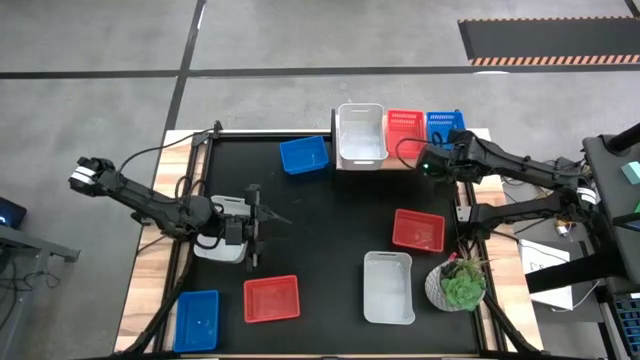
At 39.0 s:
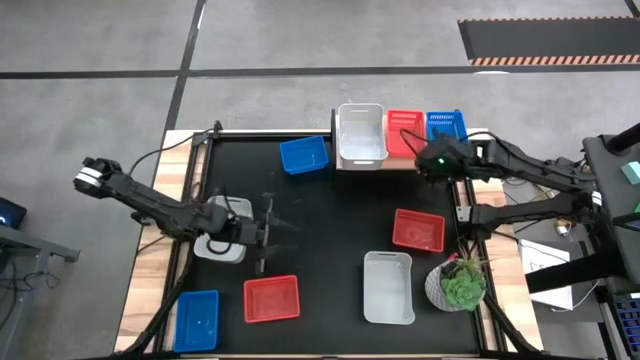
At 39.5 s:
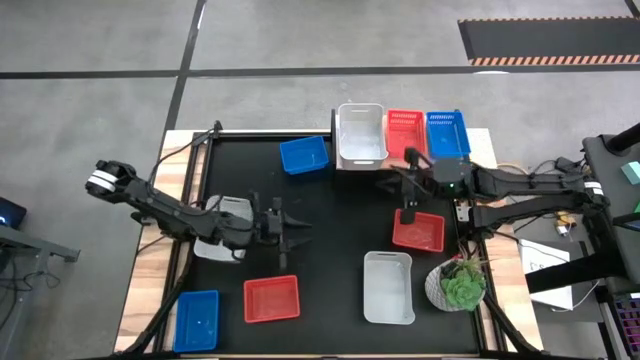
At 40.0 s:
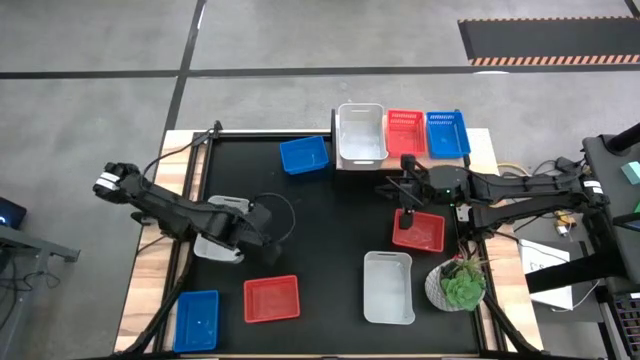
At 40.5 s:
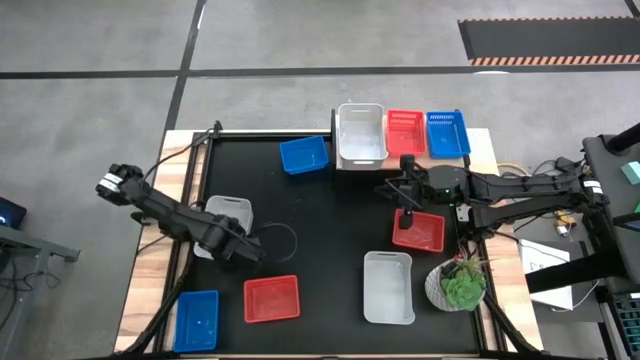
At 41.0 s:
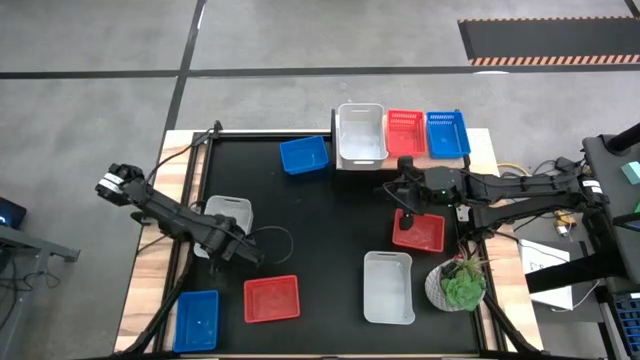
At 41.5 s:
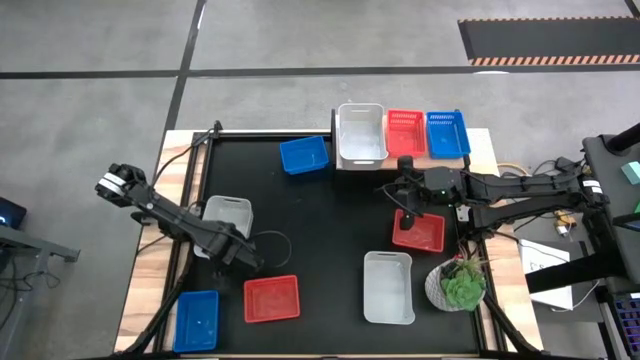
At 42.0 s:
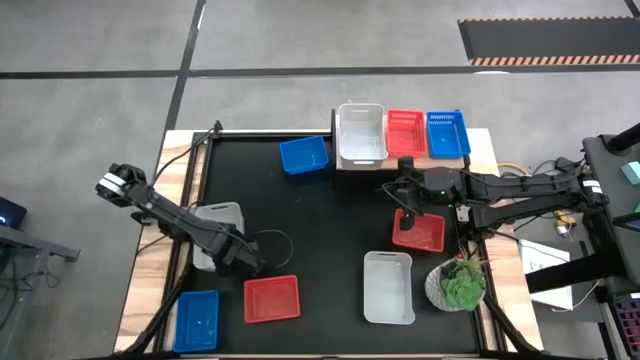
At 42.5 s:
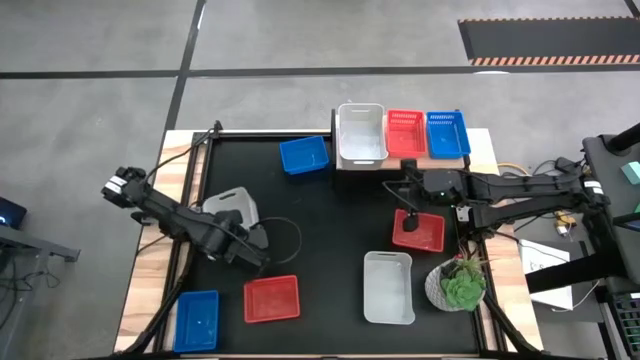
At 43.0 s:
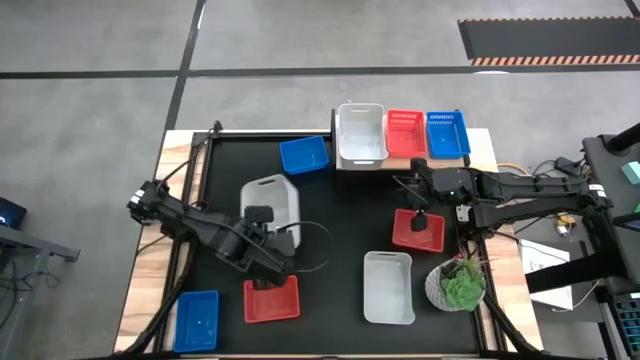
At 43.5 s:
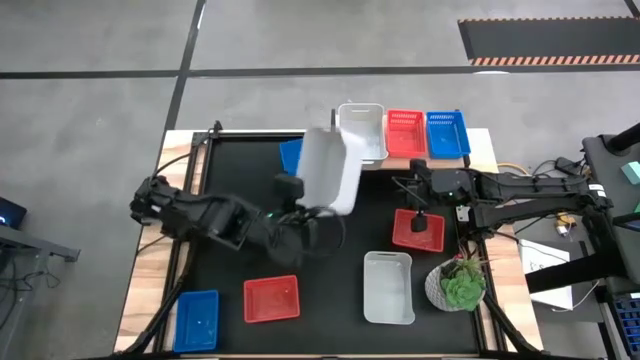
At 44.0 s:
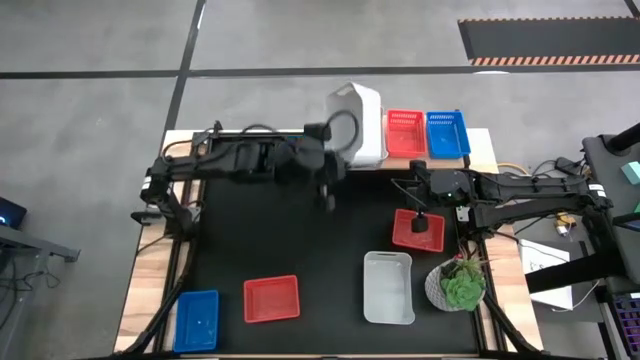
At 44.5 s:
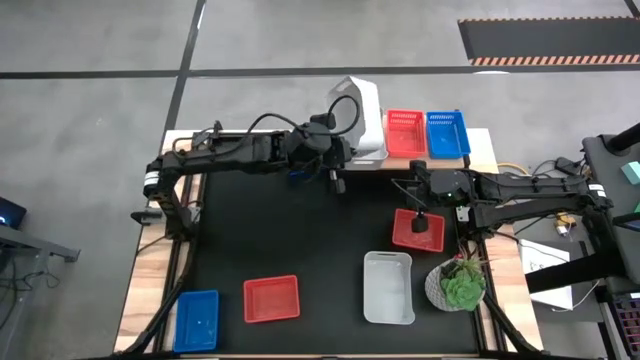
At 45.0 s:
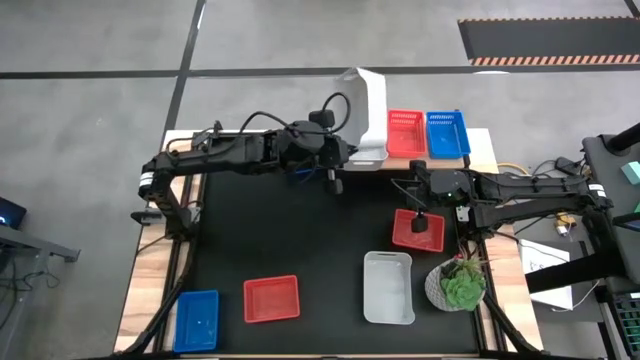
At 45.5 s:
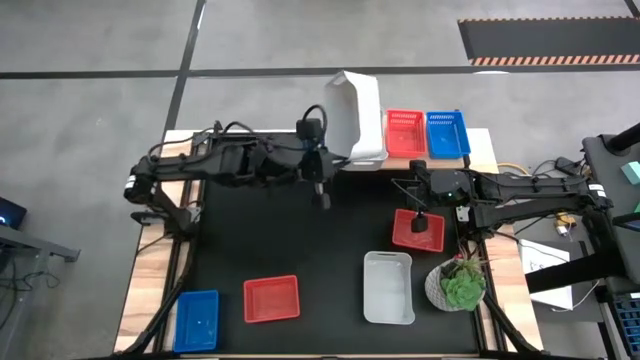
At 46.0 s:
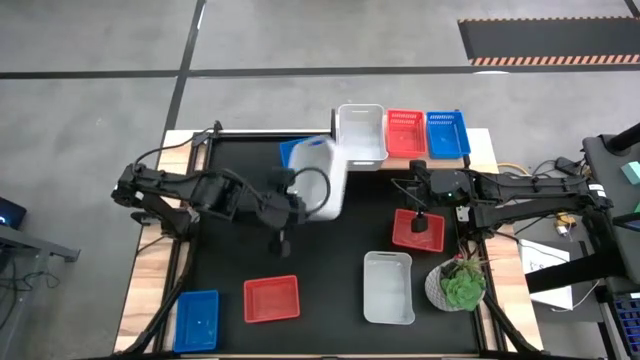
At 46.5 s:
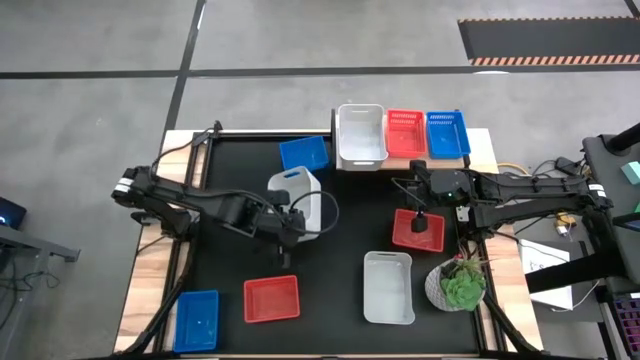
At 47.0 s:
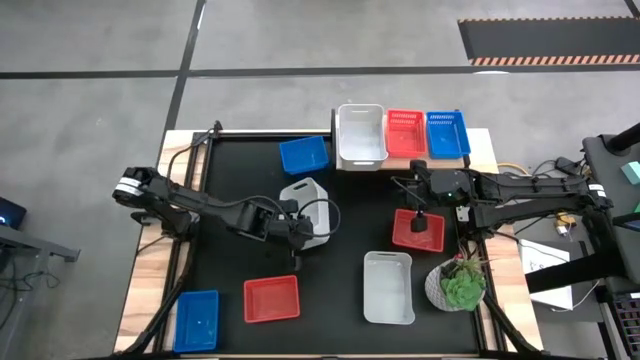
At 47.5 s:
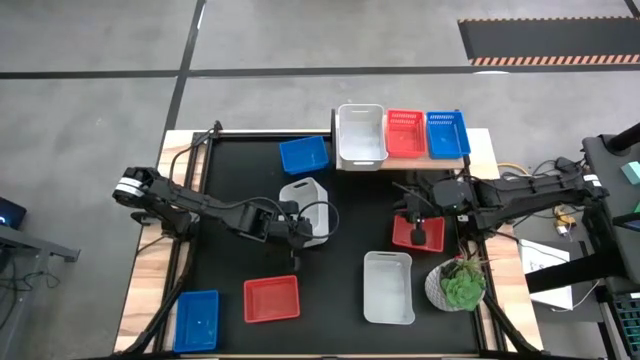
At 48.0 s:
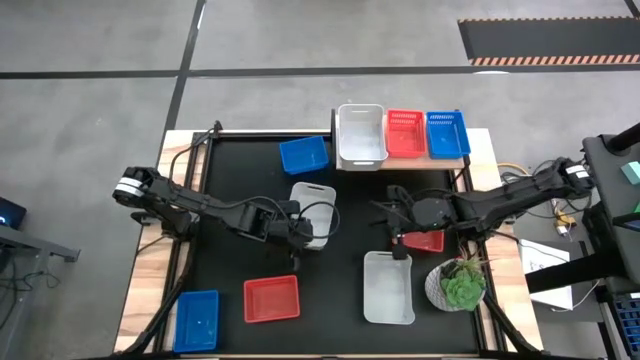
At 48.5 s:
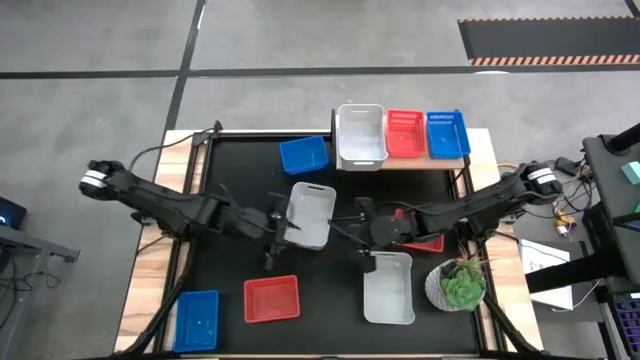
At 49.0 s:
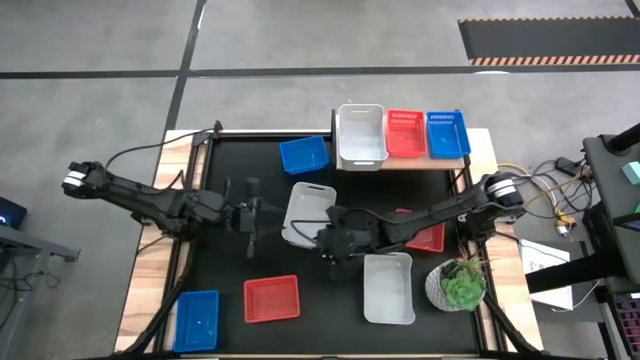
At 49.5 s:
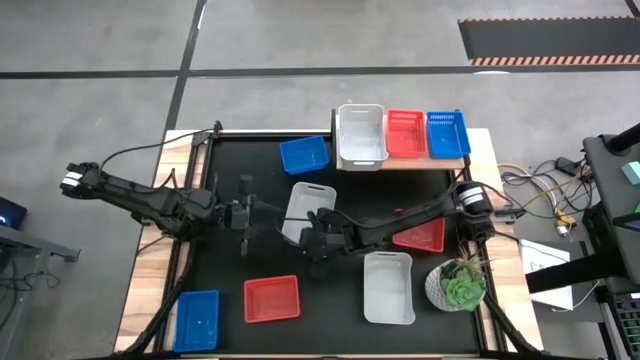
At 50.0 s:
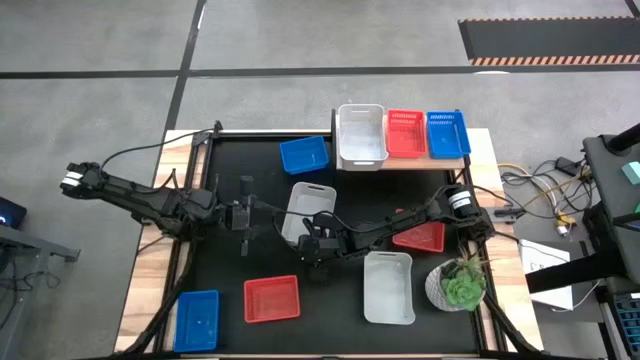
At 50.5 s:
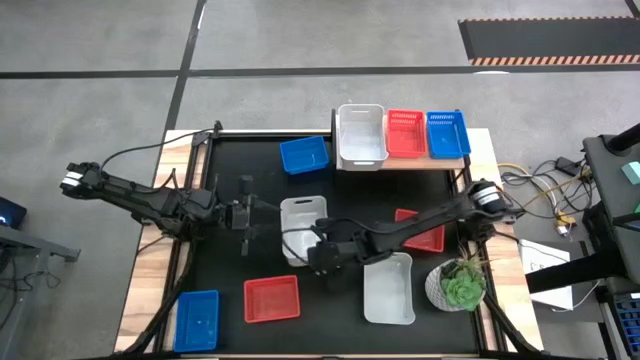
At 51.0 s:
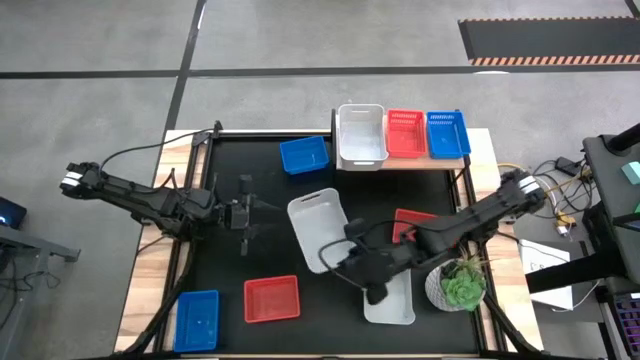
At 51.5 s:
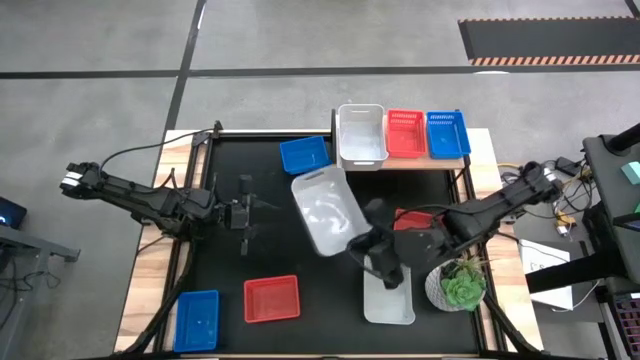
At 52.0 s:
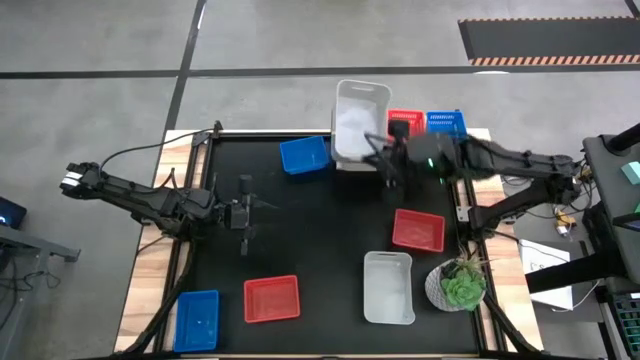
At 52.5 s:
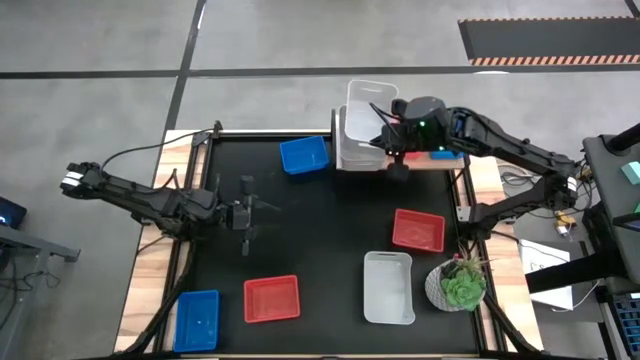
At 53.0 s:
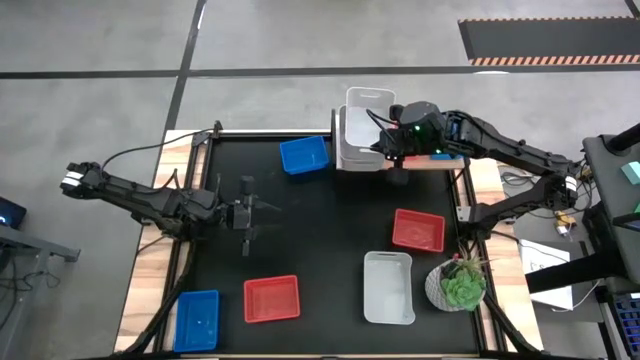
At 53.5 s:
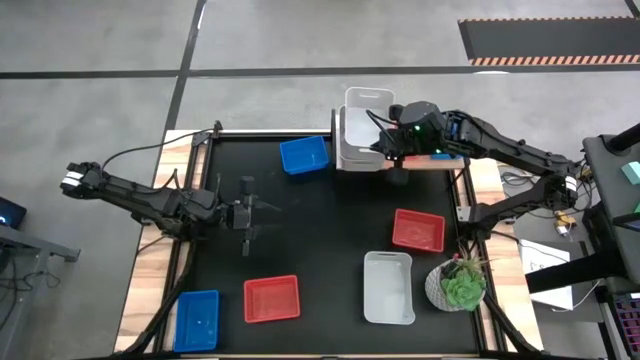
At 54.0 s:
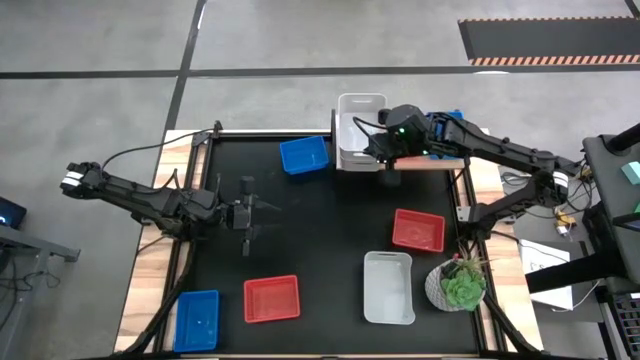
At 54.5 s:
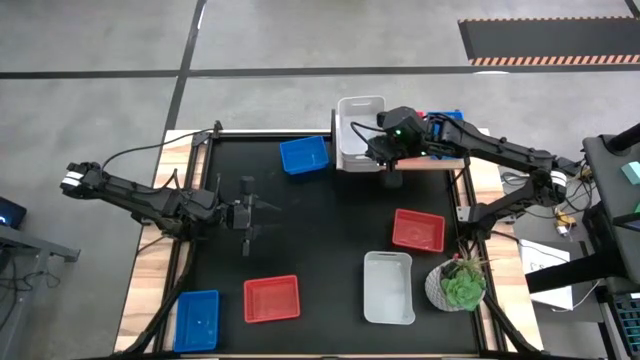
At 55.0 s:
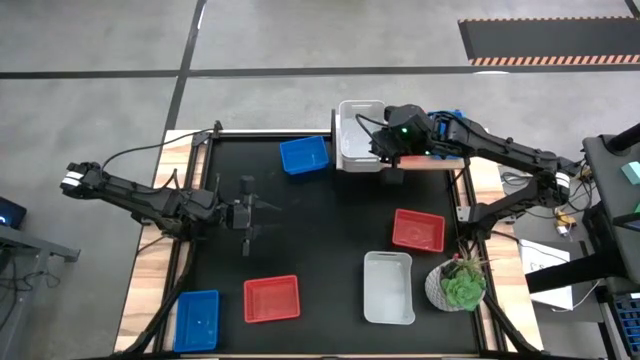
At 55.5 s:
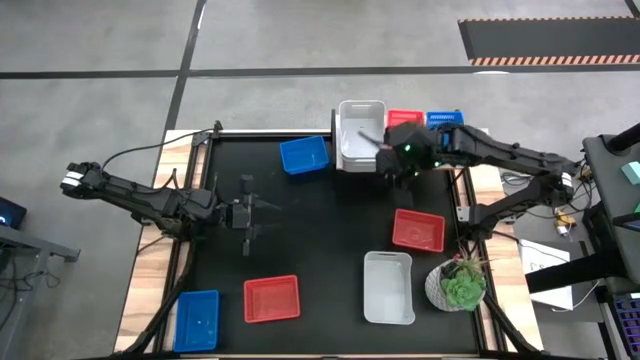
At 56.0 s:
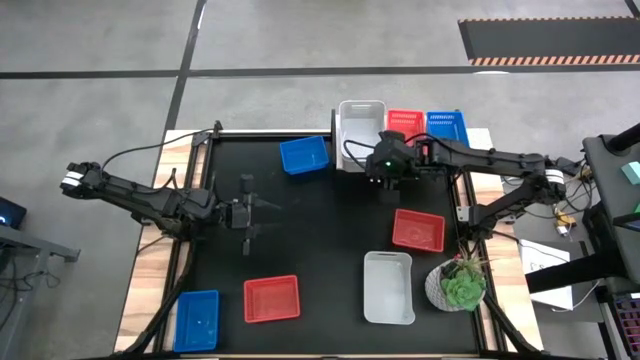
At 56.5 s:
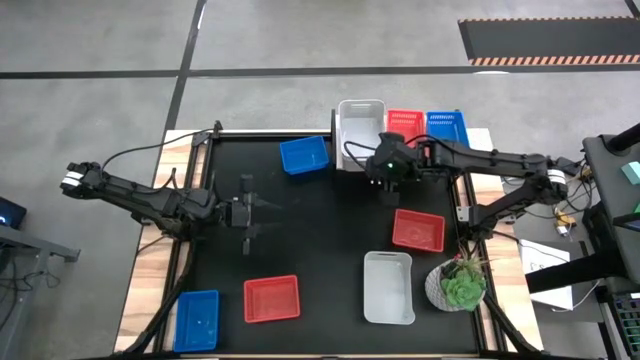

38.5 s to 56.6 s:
Task: Stack baskets on shelf by color
Stack the top gray bin on top of the gray bin on the shelf
